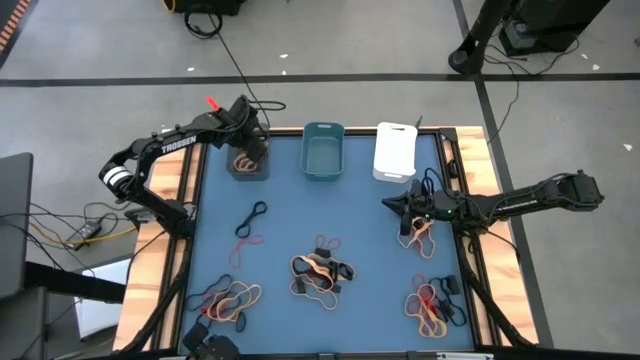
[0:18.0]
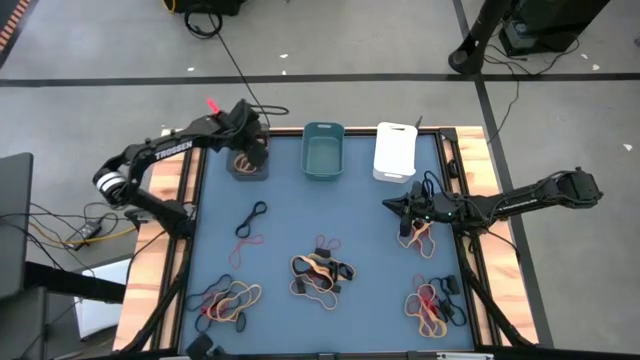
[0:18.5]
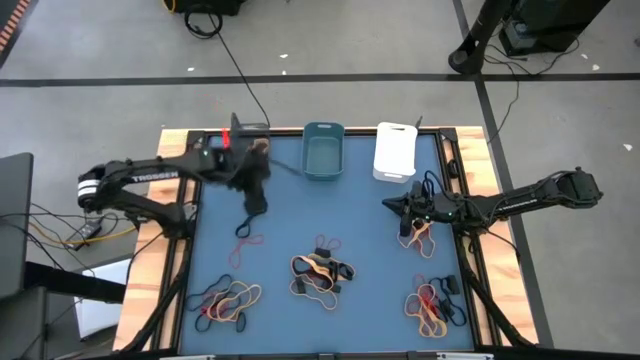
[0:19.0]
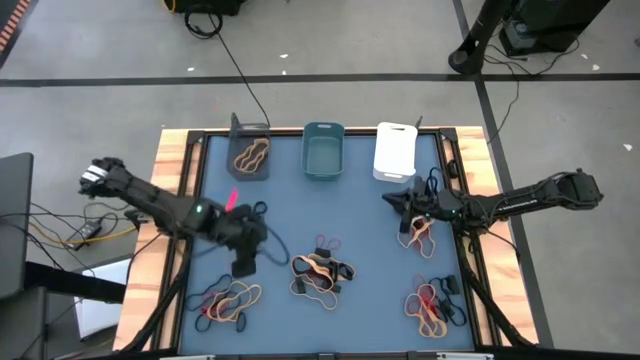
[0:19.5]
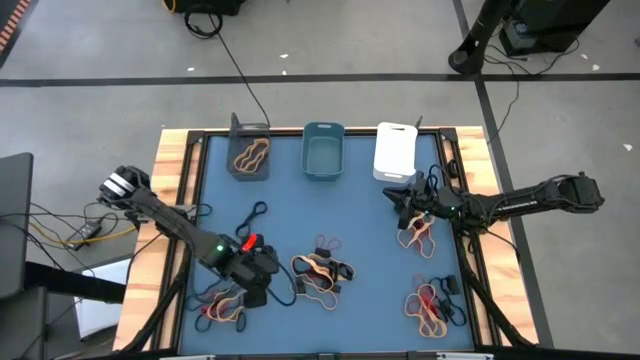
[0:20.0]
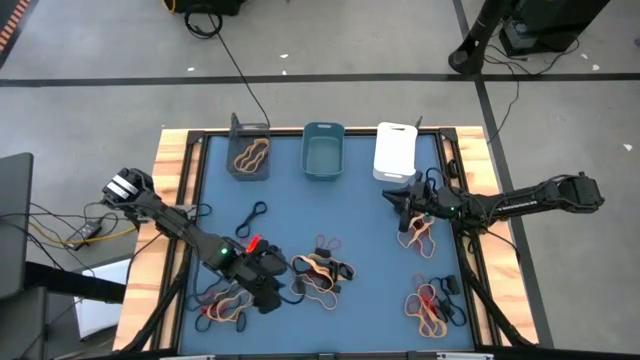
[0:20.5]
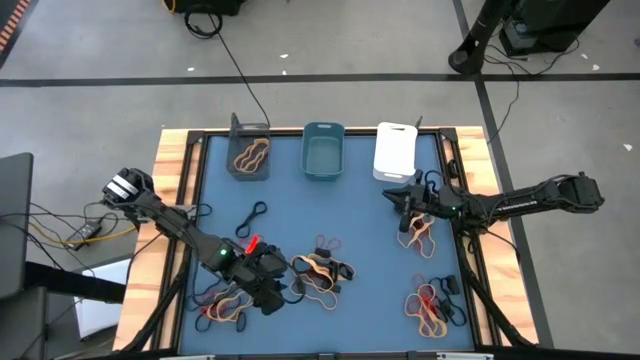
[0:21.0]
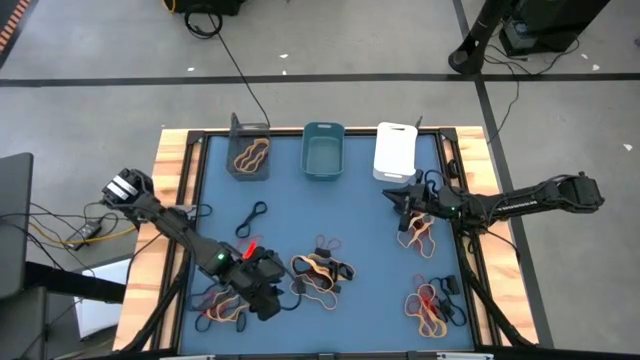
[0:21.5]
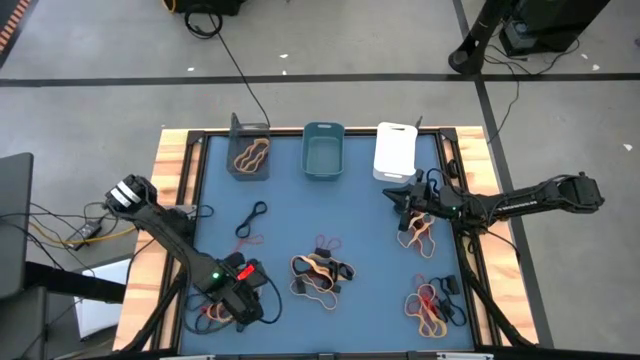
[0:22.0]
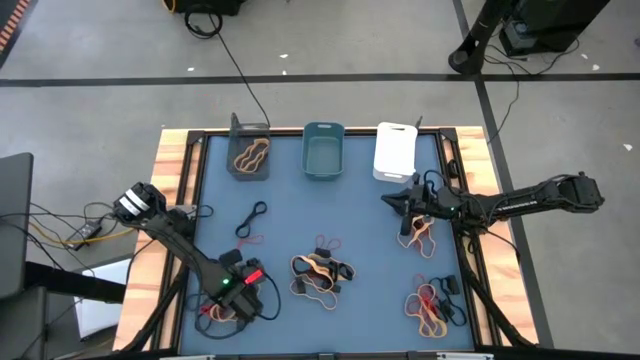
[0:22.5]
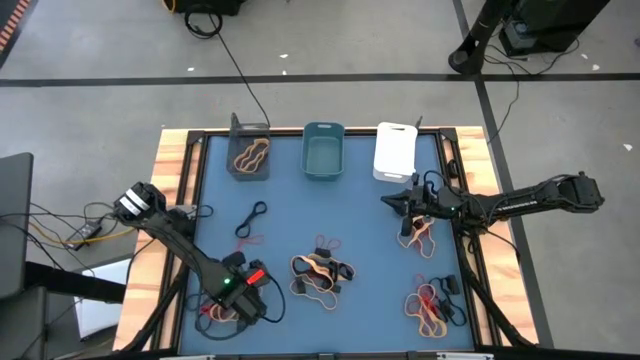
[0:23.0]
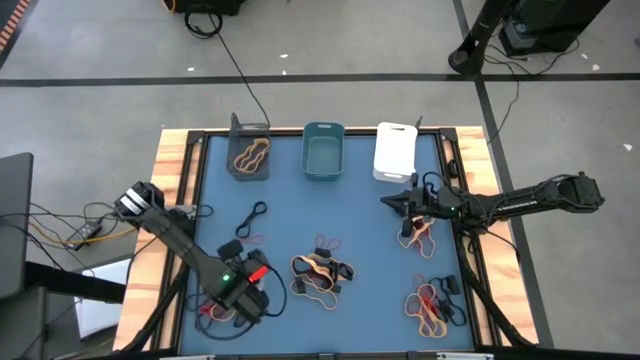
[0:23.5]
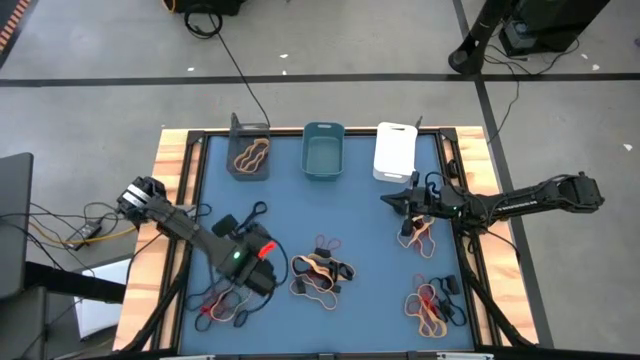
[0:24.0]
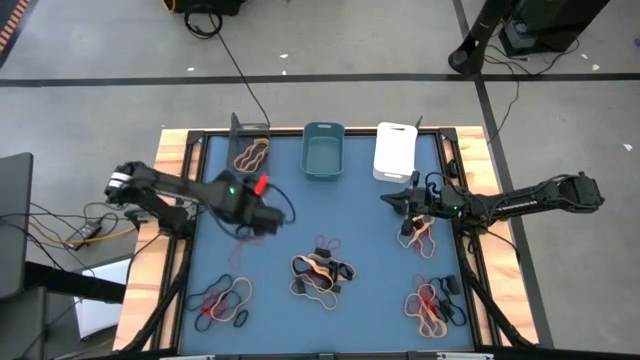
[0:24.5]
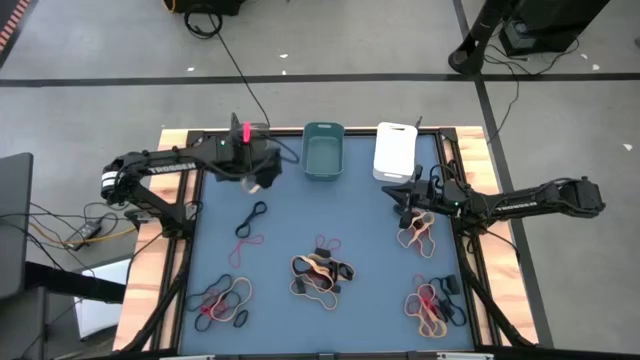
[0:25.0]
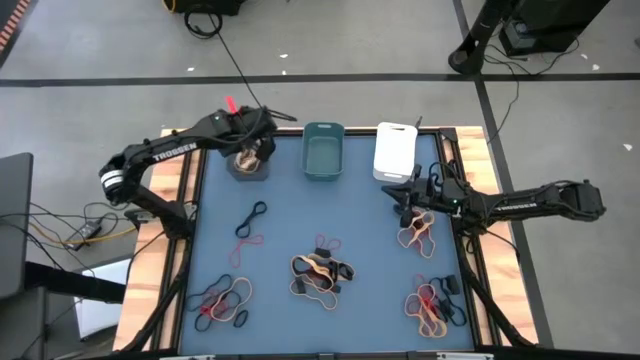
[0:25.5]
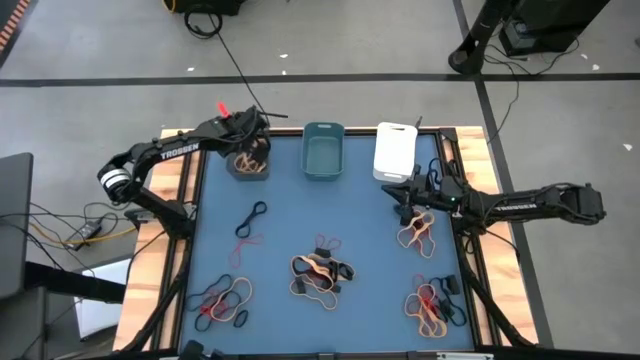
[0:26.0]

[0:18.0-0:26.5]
Task: Sort rubber bands into baskets
Put the yellow rubber band into the black bin

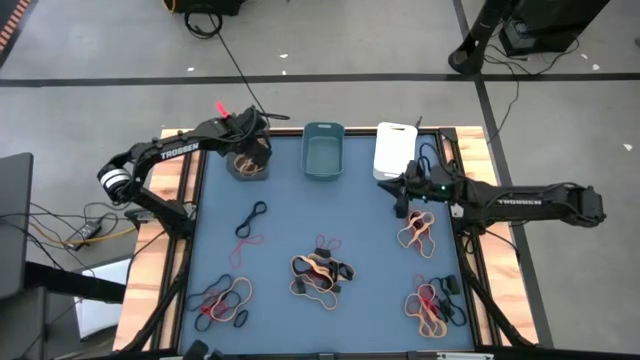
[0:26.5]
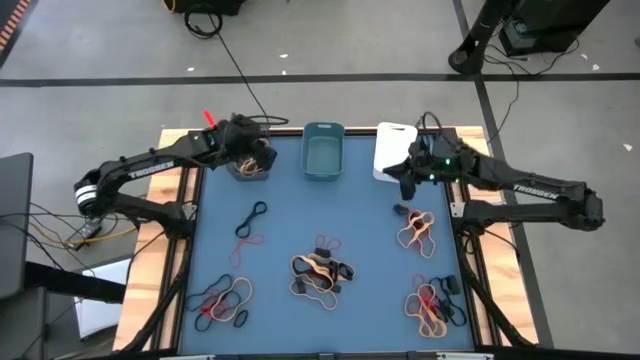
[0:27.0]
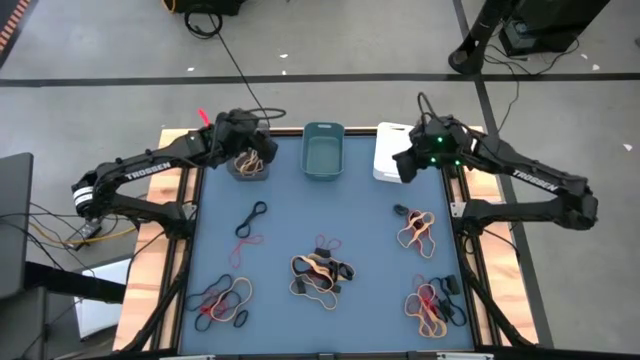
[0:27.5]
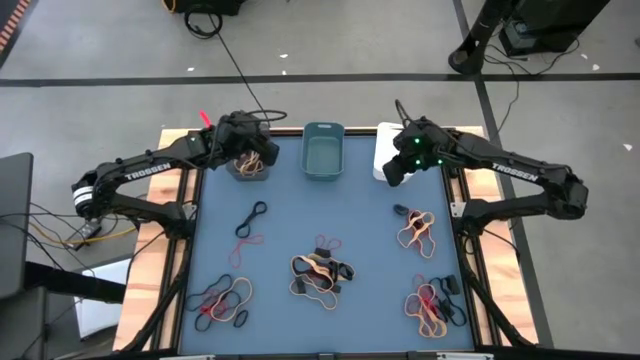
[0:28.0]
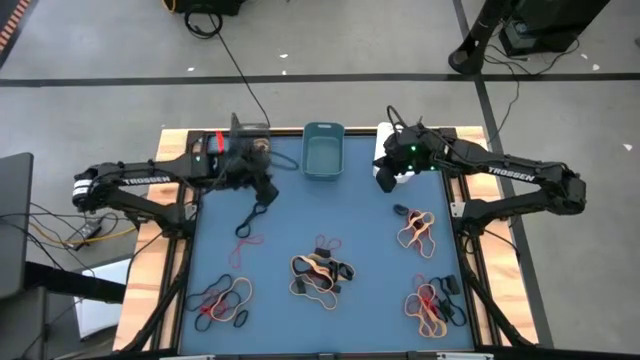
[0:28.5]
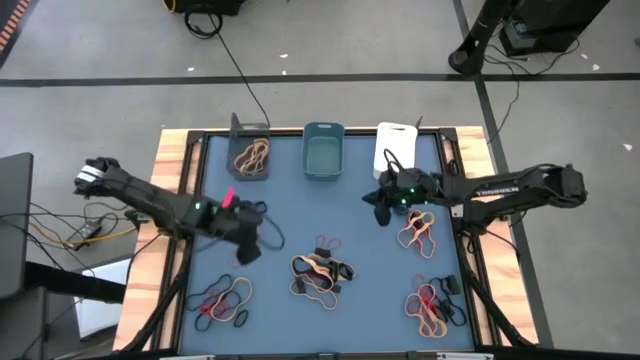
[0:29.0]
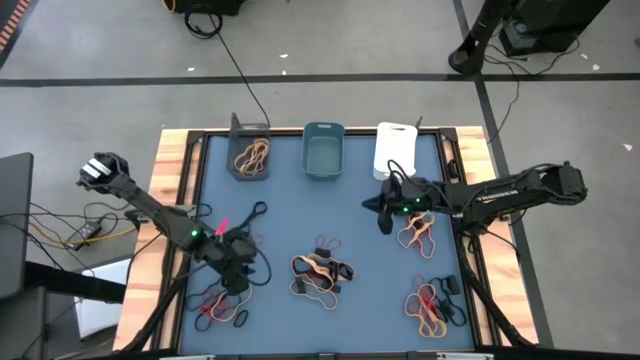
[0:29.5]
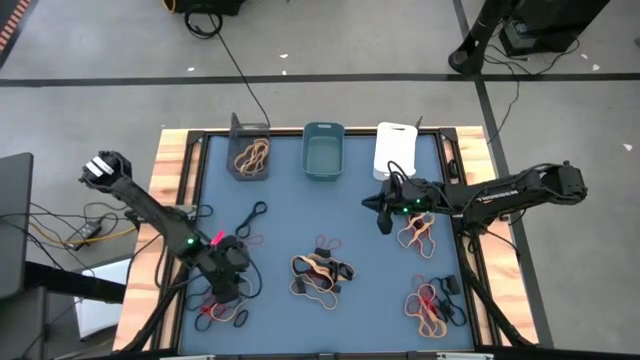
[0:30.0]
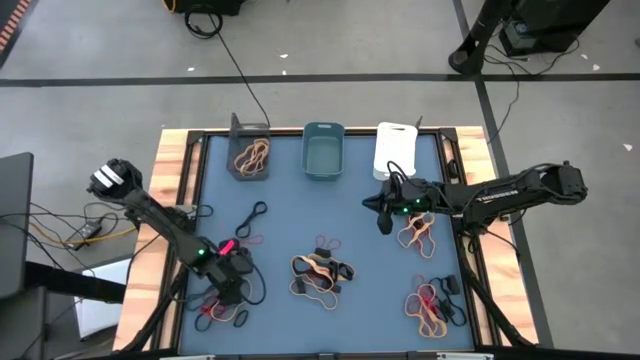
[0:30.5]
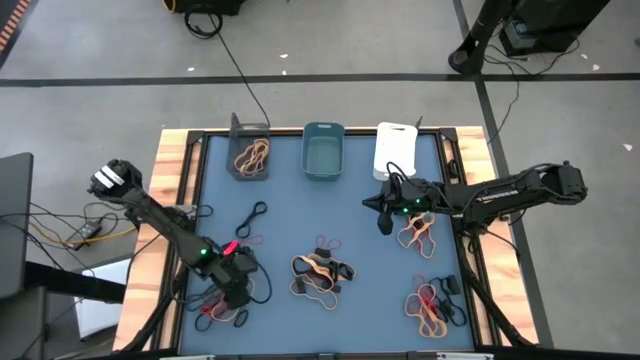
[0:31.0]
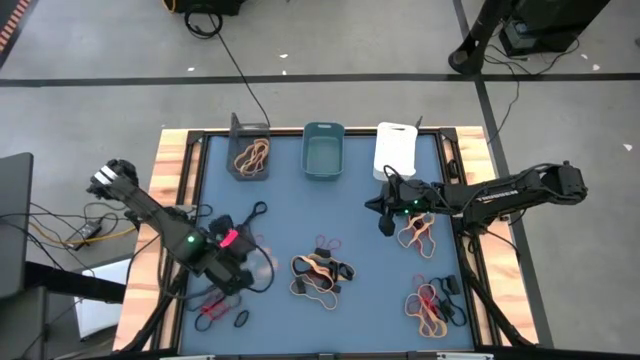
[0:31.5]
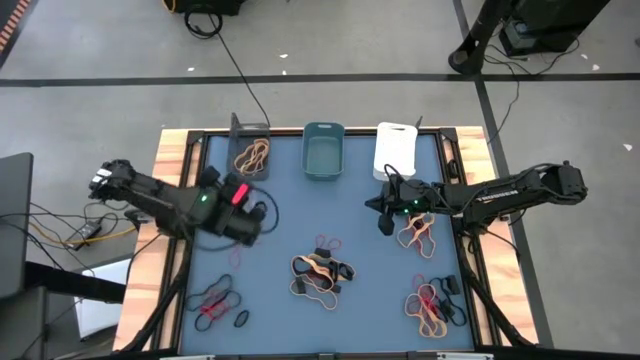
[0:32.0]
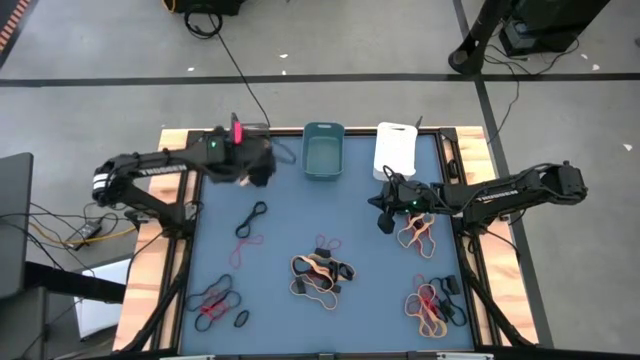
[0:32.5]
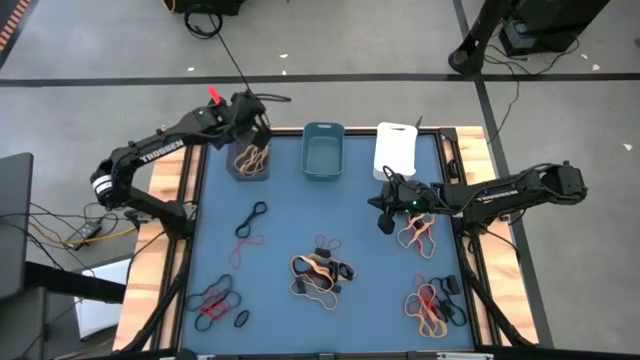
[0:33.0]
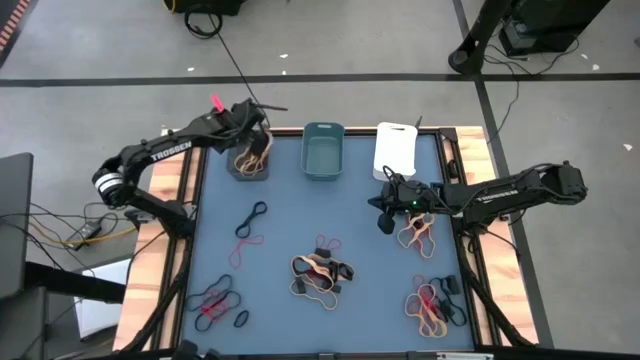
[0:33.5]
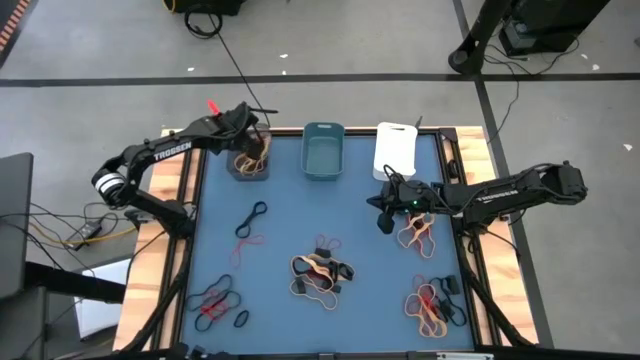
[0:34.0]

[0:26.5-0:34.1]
Put the yellow rubber band into the black bin

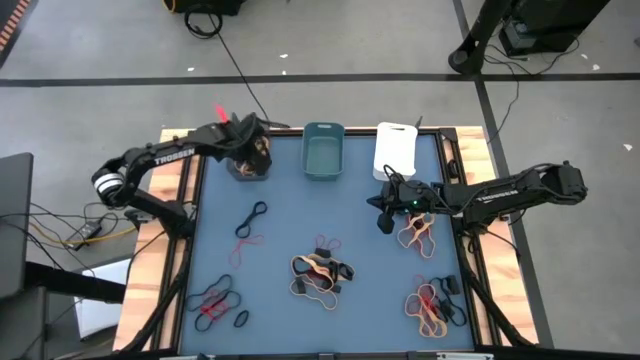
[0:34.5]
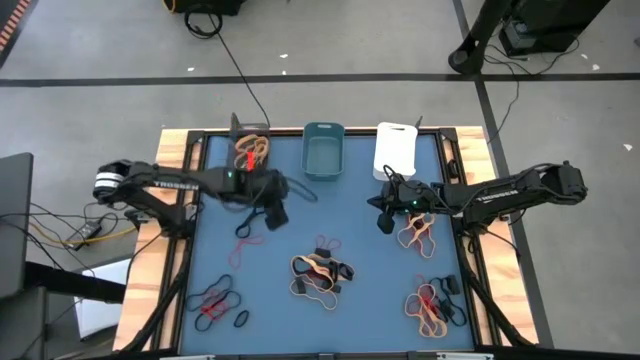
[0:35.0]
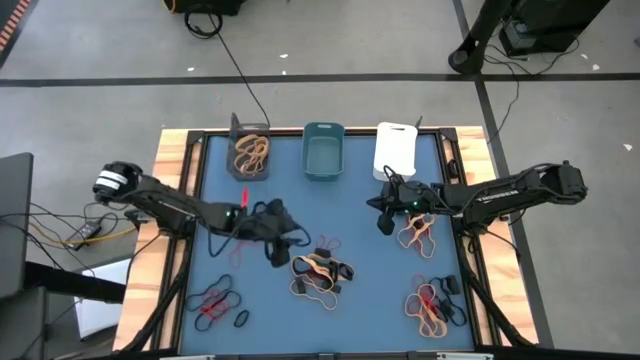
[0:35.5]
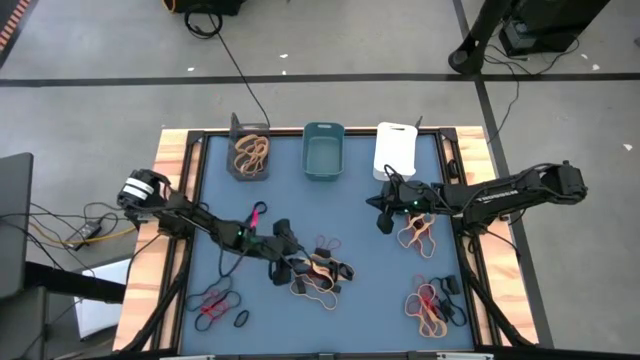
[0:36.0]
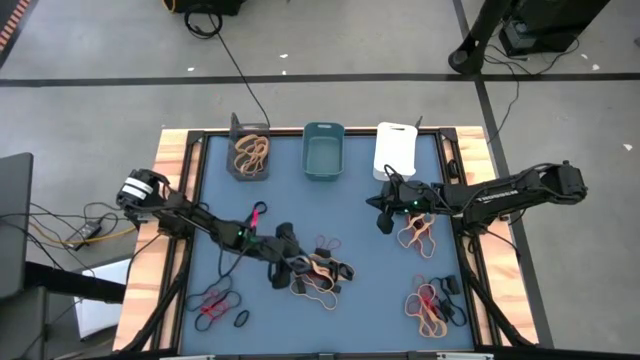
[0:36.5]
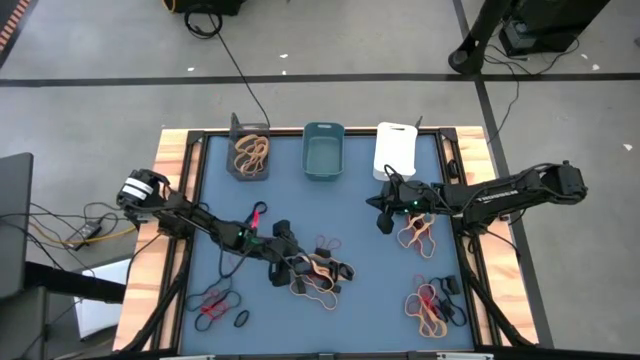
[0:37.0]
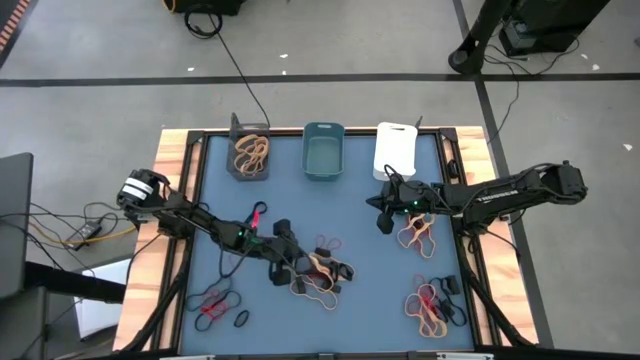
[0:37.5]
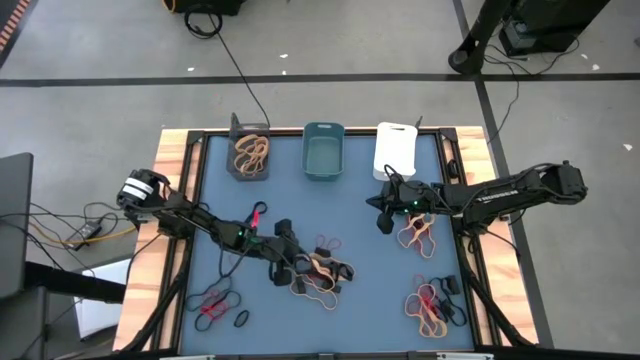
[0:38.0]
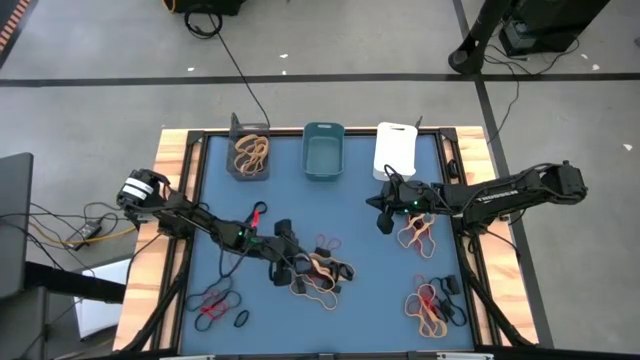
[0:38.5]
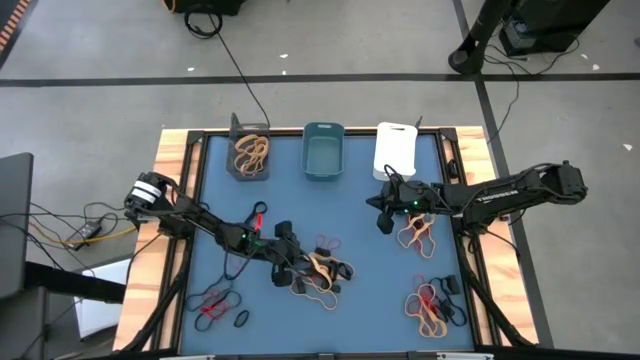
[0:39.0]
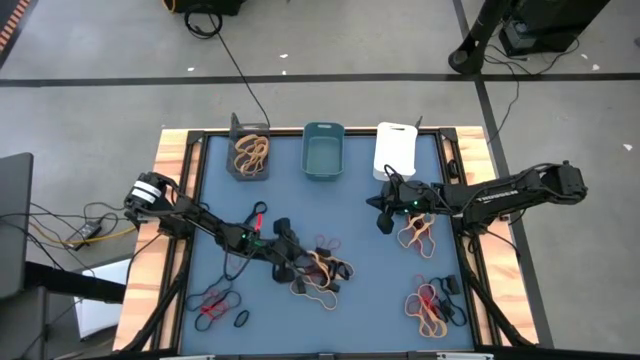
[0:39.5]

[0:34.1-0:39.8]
Put the yellow rubber band into the black bin
